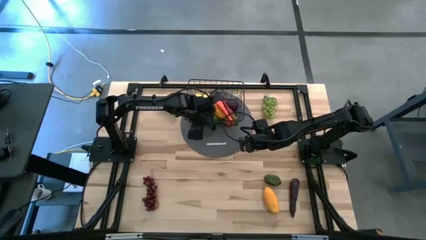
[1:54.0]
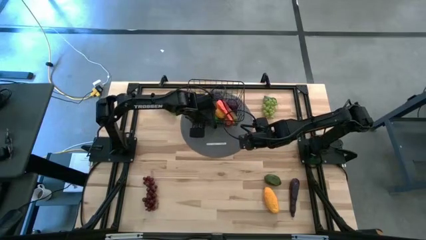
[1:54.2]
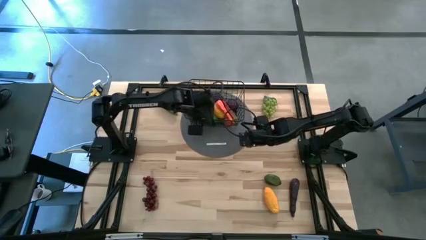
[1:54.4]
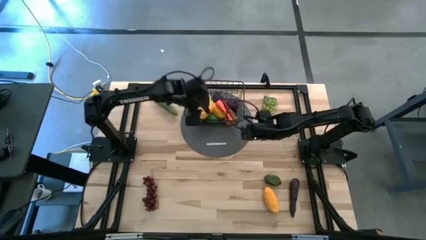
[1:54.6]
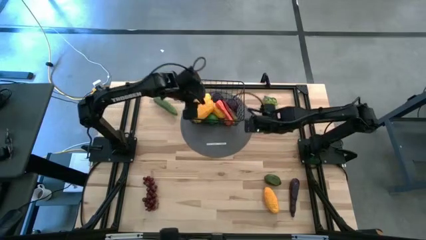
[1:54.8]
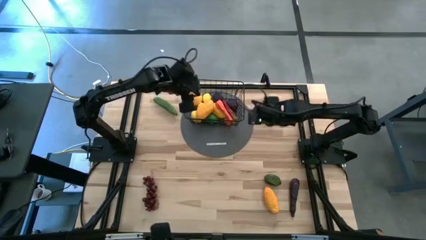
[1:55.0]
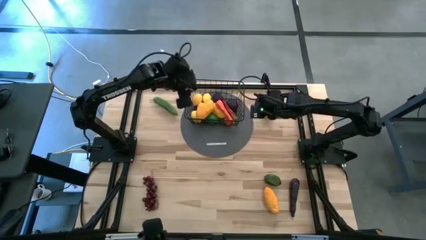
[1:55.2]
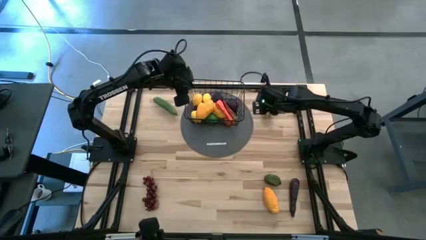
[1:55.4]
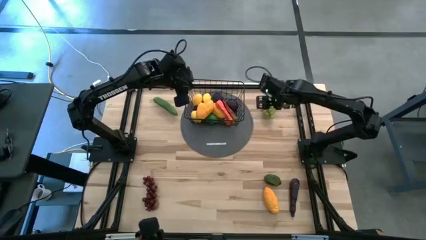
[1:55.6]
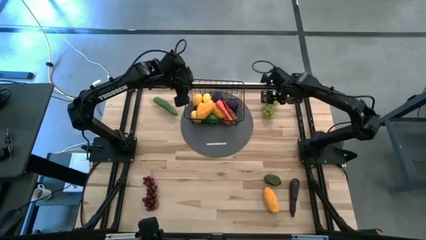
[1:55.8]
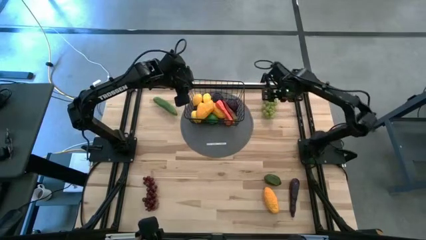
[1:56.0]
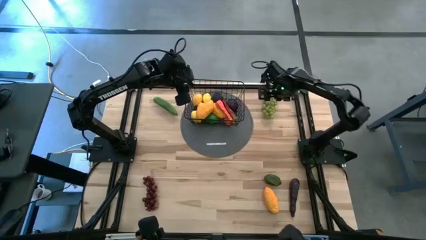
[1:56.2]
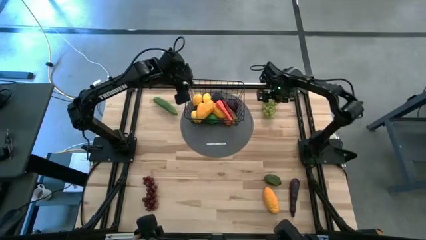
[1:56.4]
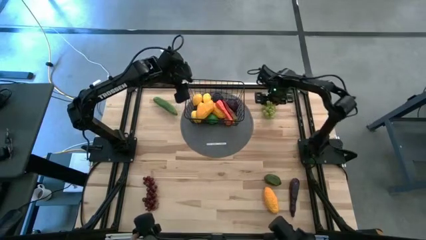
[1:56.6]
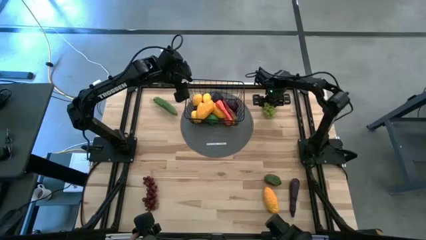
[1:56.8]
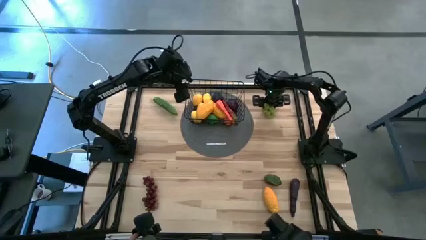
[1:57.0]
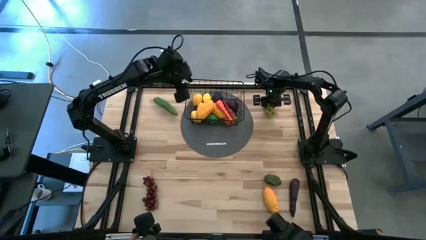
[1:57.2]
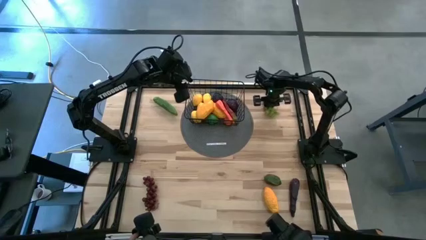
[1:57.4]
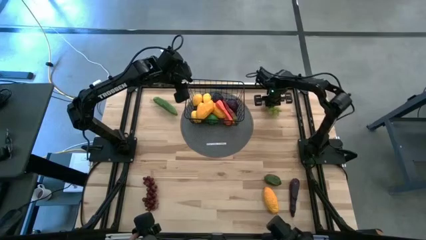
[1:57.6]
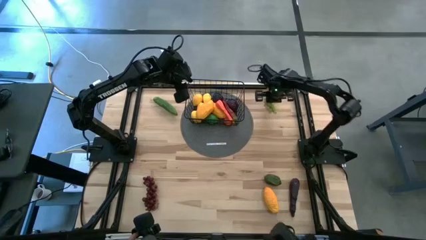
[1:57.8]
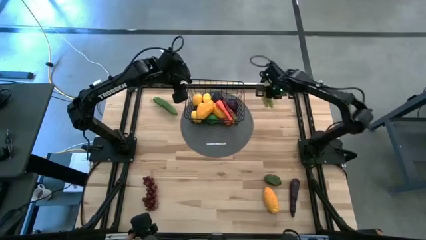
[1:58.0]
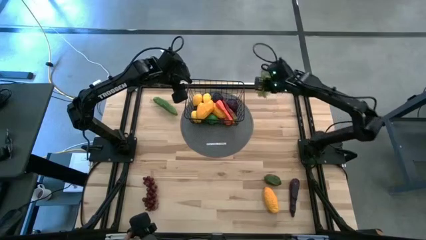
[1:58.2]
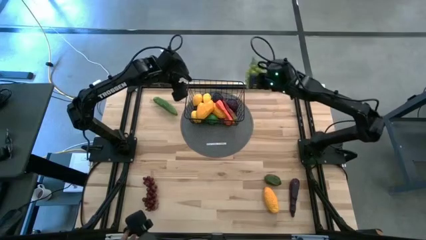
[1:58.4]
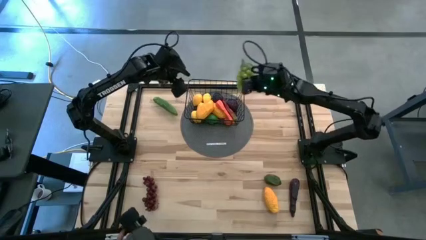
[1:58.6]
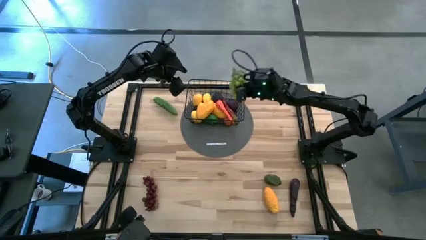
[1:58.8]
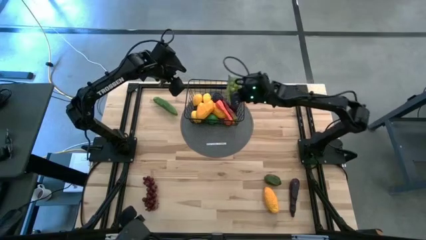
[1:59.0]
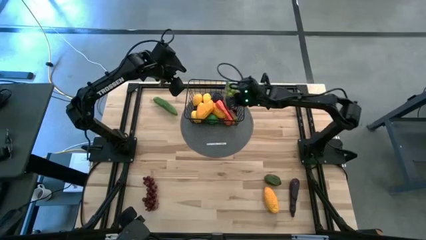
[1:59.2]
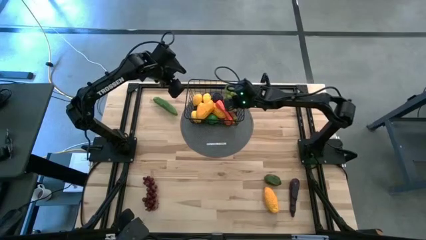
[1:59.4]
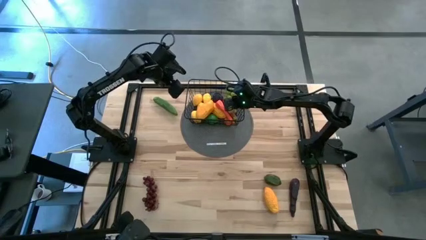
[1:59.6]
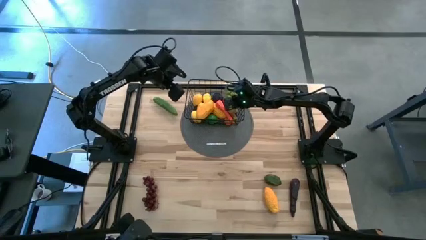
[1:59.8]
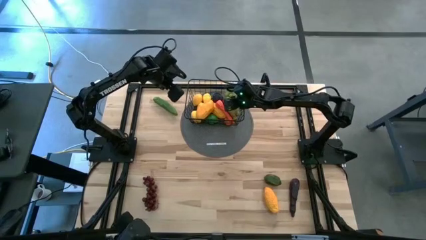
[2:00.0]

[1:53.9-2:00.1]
Task: Build produce basket
Put the green grapes into the basket

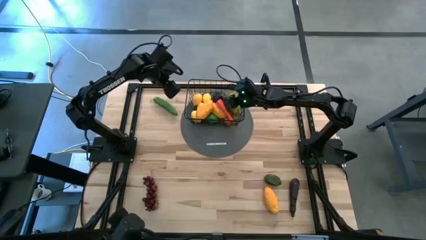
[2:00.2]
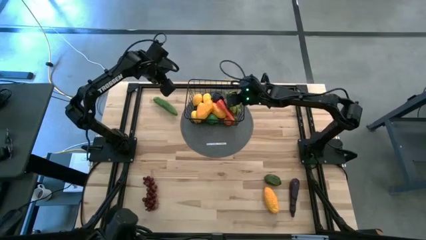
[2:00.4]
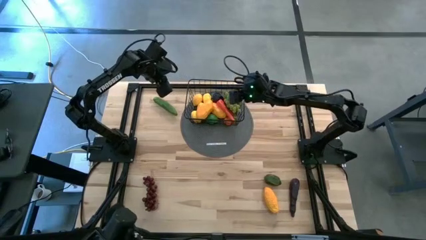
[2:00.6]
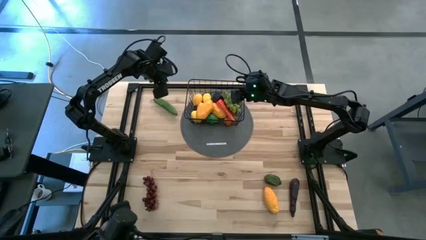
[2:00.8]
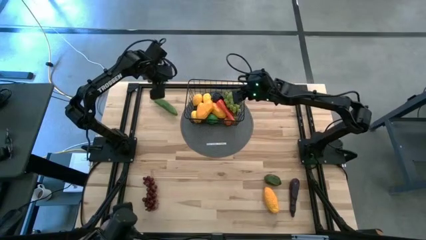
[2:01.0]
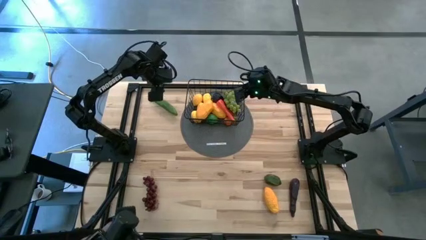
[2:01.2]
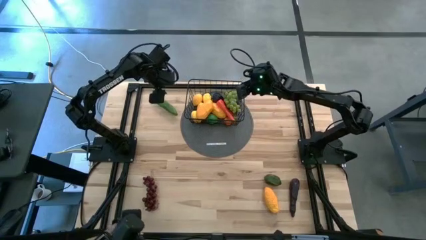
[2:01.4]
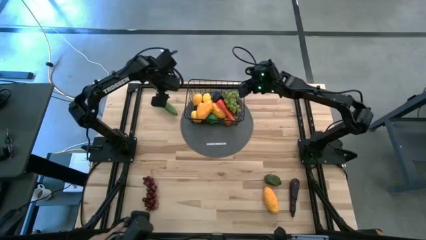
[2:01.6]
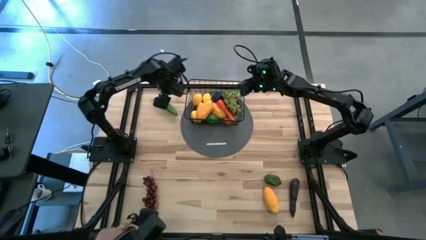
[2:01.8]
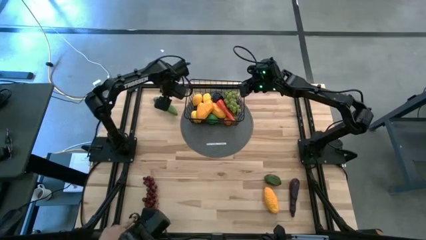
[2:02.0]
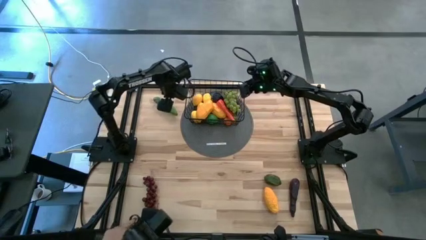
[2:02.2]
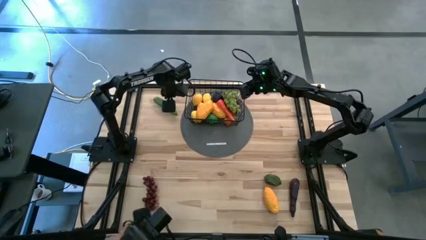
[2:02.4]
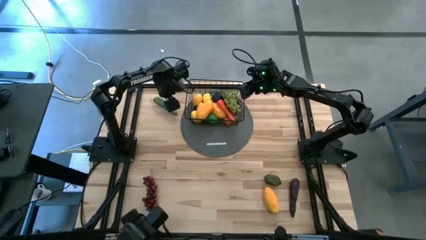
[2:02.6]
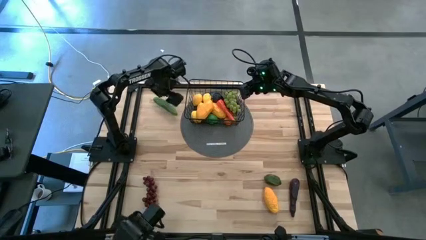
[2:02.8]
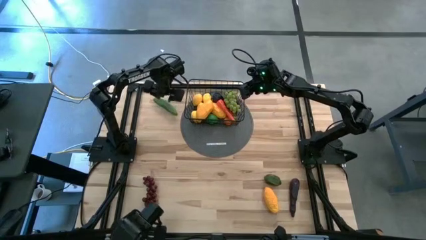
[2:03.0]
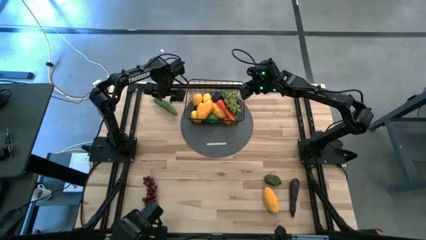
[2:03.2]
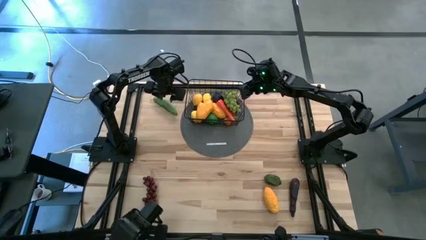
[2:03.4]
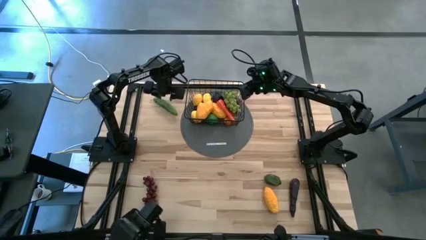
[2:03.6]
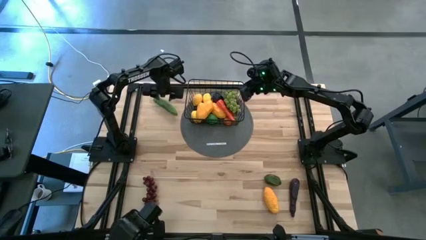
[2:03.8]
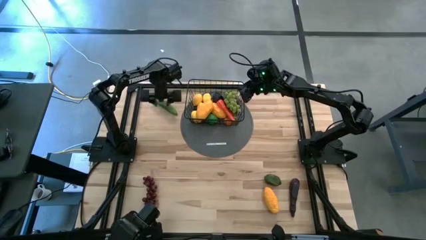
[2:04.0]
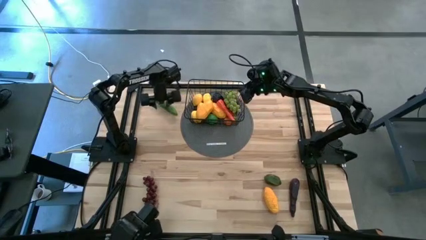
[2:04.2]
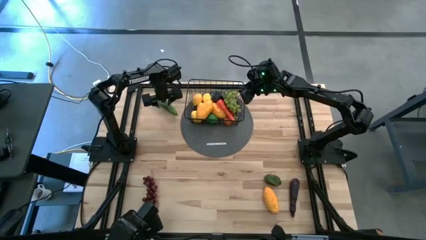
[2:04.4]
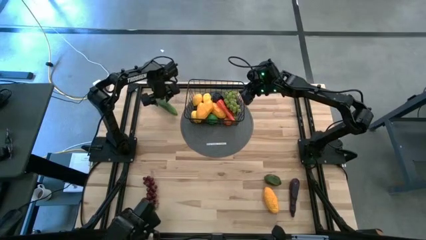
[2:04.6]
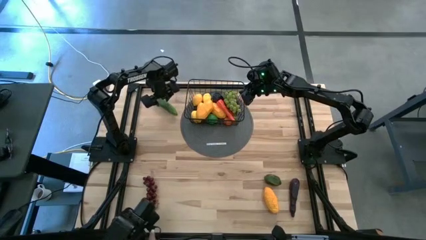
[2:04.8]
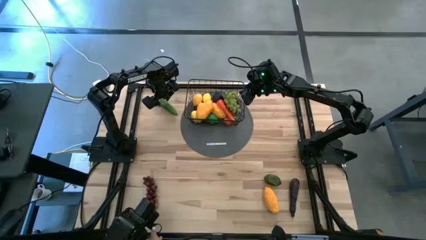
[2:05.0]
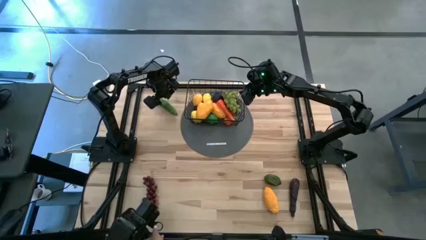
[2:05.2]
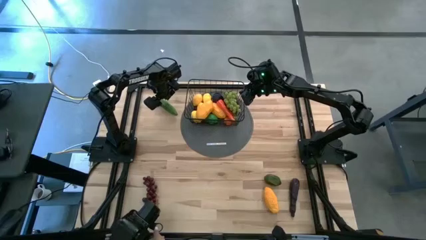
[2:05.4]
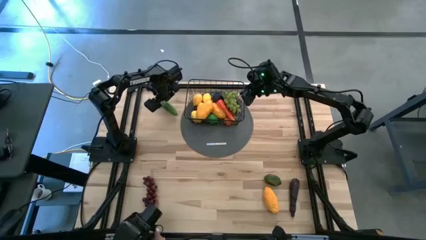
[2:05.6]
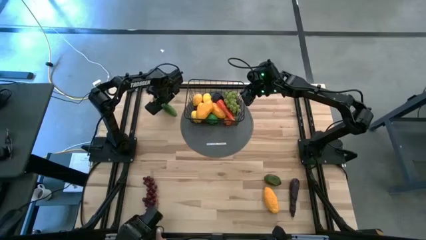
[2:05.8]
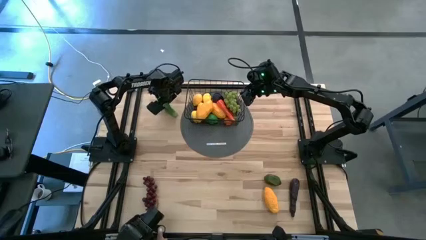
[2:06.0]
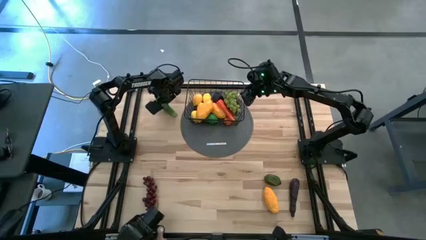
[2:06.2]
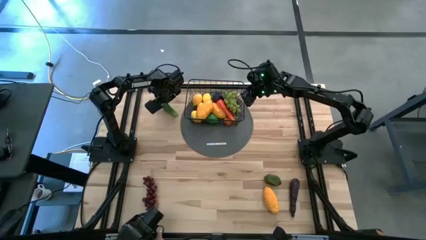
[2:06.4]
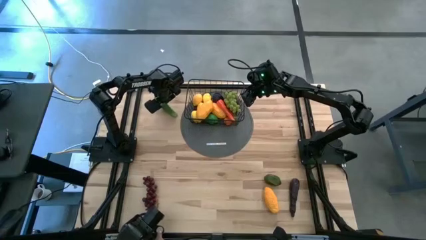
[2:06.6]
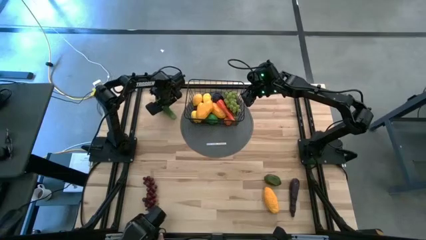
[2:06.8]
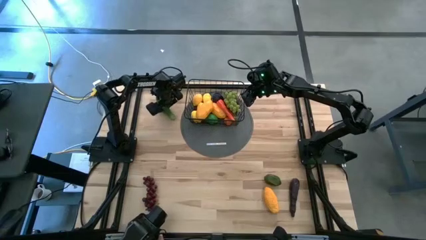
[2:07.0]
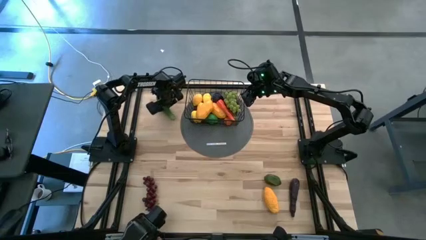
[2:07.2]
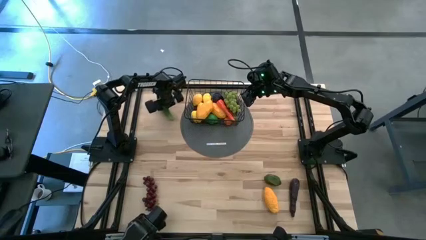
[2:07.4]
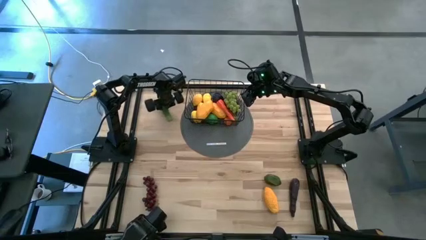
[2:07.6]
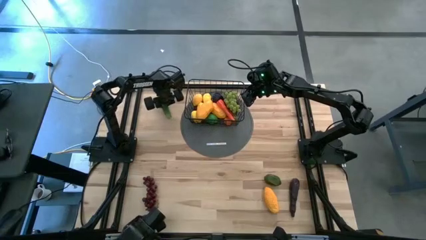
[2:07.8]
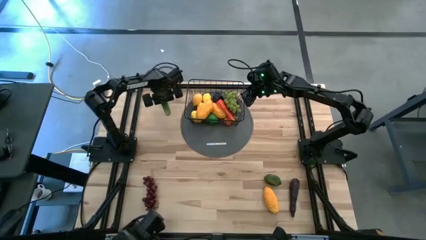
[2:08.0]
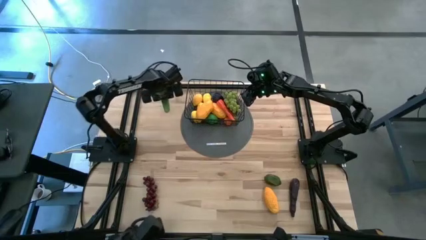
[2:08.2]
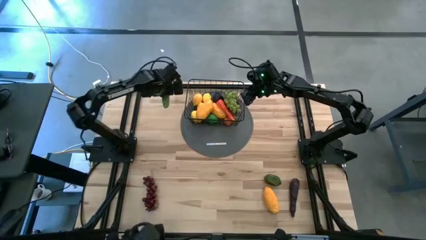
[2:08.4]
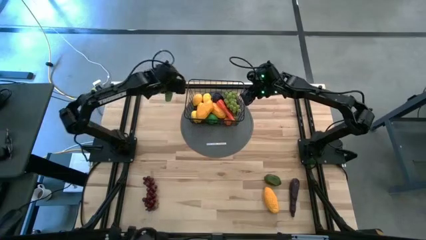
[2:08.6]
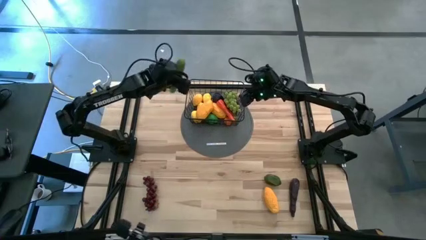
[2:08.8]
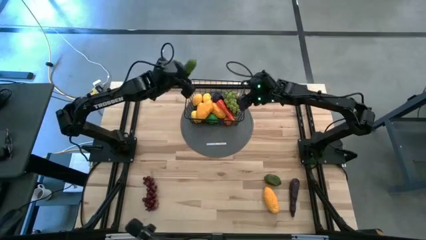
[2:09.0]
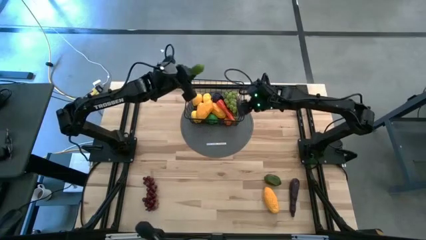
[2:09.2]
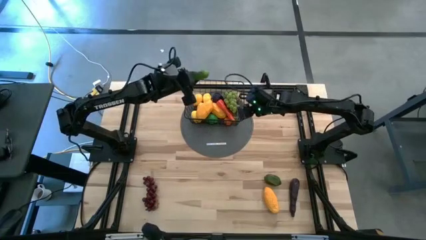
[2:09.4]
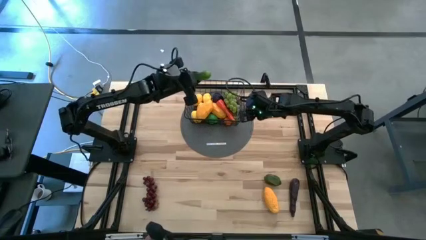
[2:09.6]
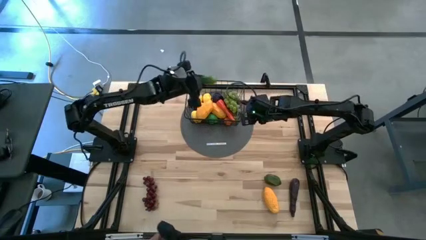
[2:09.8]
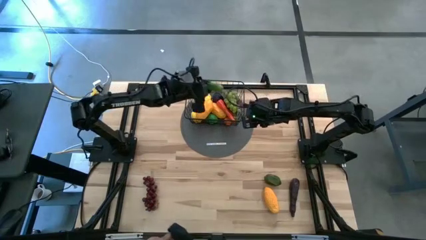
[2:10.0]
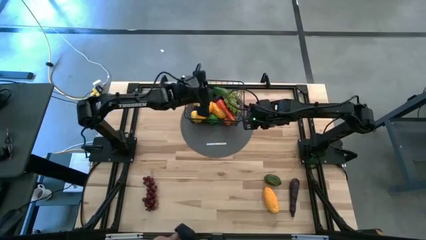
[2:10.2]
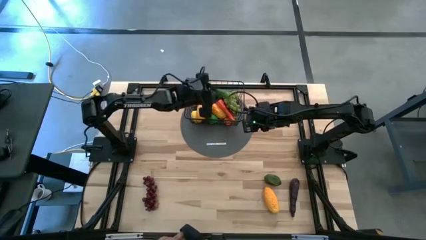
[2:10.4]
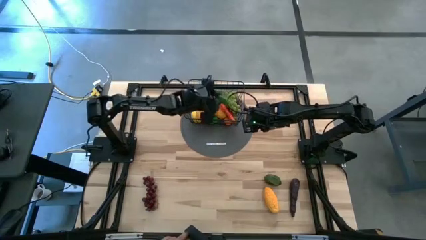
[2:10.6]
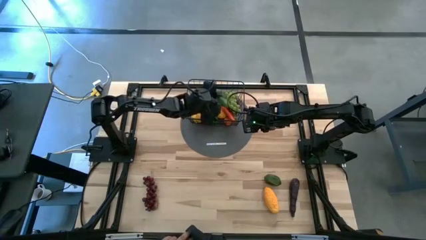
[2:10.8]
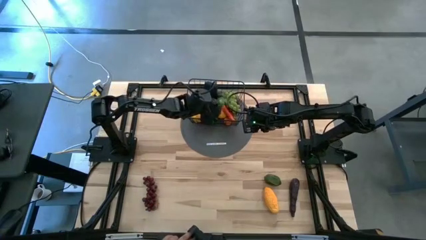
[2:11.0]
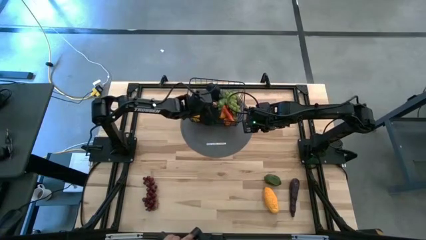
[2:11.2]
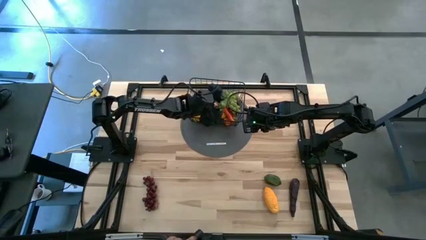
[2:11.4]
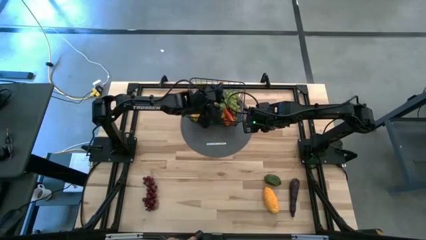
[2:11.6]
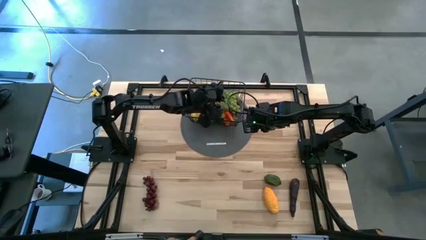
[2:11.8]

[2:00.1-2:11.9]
Put the green cucumber into the basket
